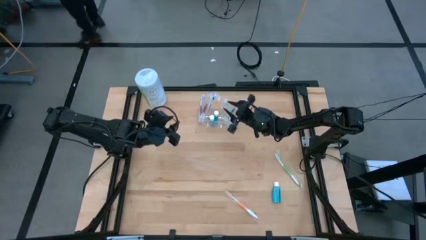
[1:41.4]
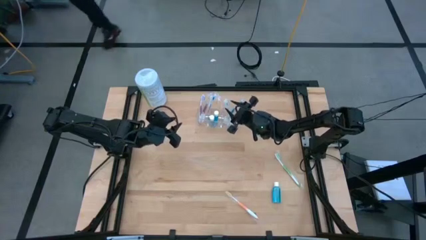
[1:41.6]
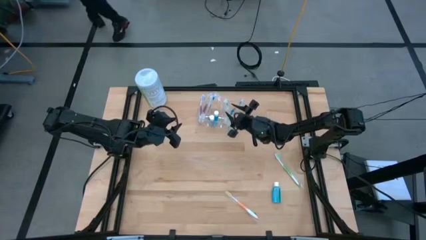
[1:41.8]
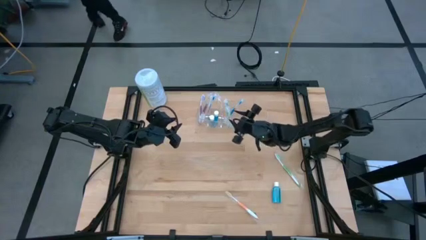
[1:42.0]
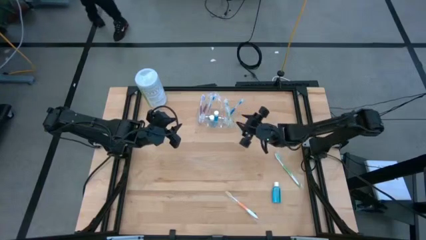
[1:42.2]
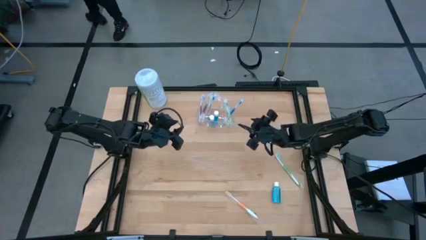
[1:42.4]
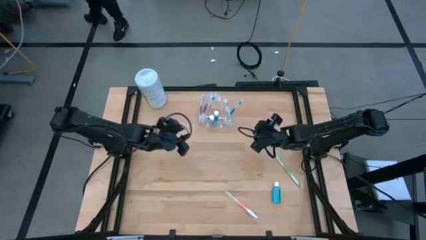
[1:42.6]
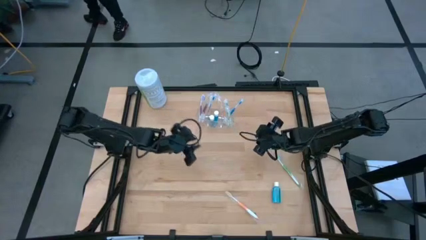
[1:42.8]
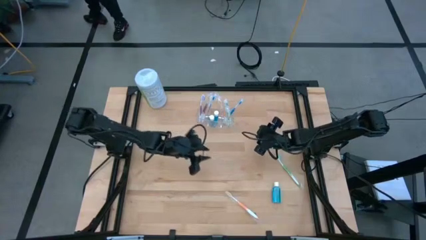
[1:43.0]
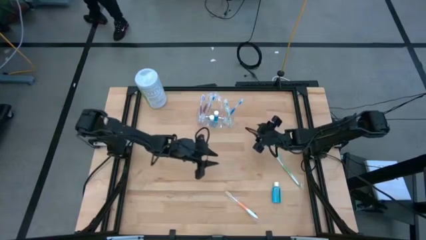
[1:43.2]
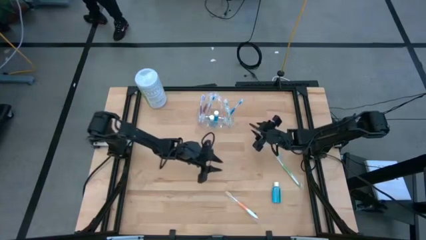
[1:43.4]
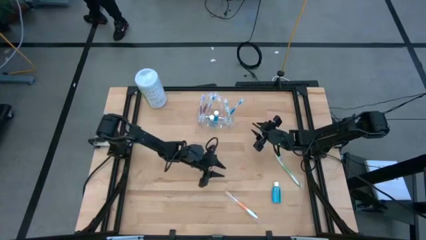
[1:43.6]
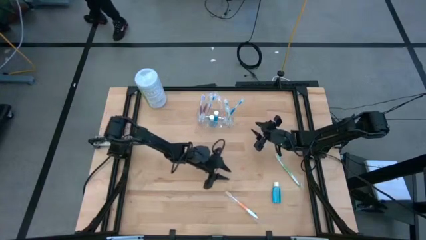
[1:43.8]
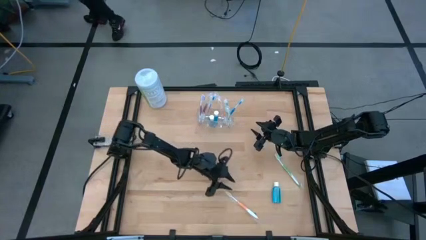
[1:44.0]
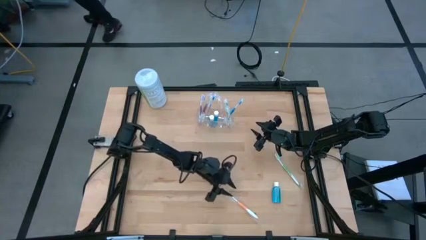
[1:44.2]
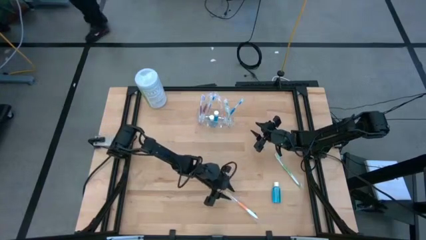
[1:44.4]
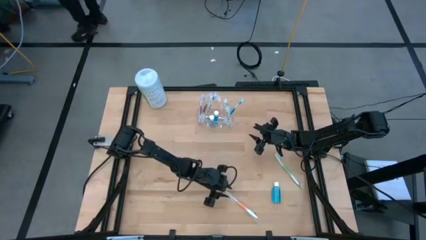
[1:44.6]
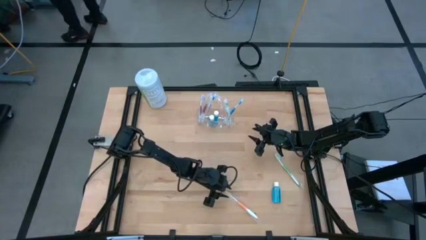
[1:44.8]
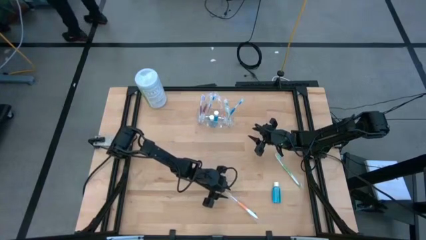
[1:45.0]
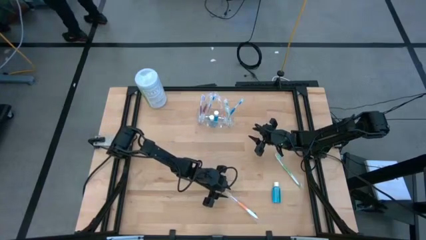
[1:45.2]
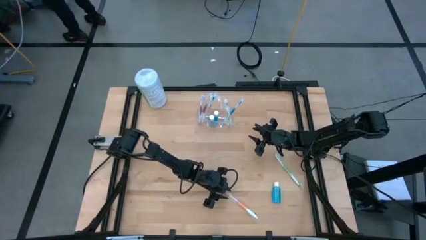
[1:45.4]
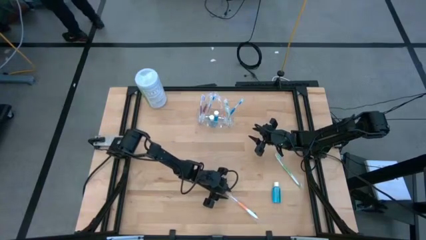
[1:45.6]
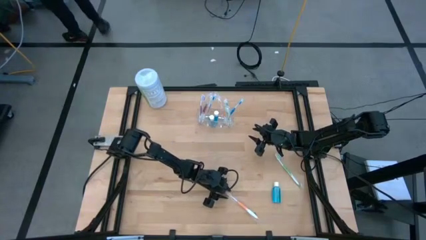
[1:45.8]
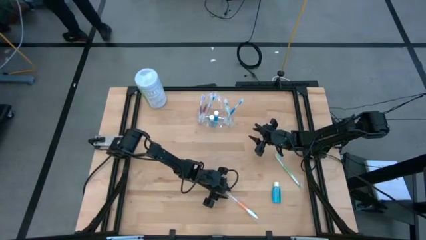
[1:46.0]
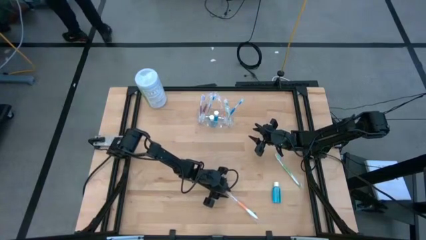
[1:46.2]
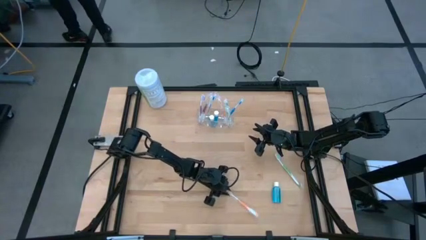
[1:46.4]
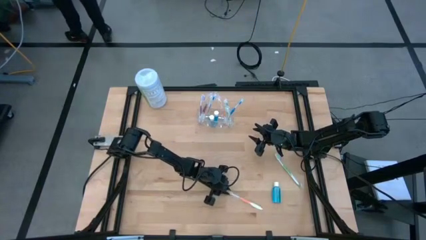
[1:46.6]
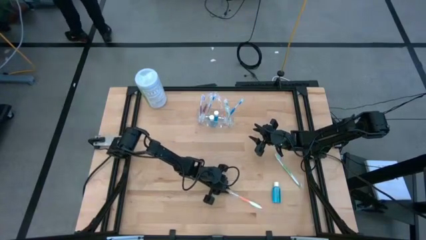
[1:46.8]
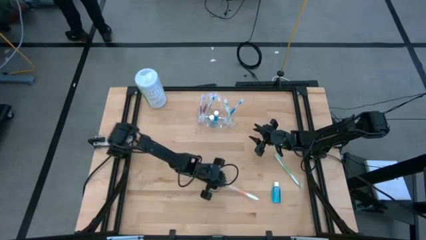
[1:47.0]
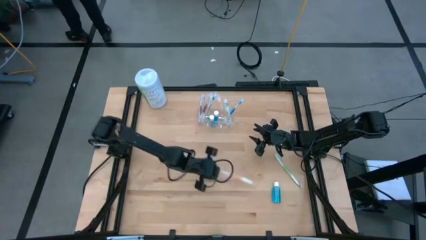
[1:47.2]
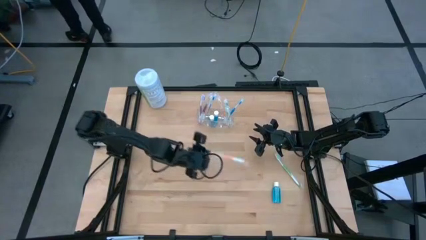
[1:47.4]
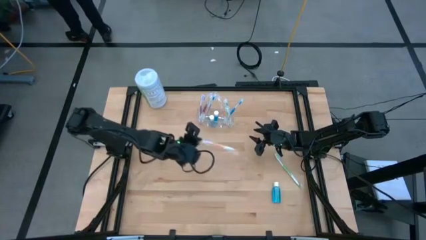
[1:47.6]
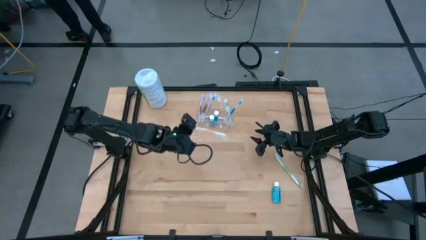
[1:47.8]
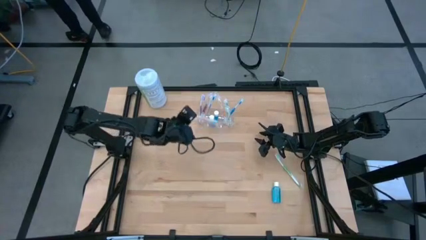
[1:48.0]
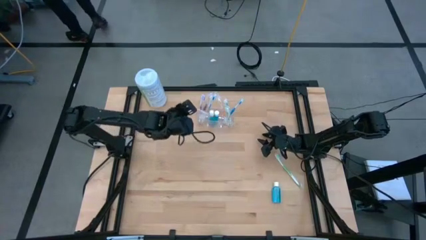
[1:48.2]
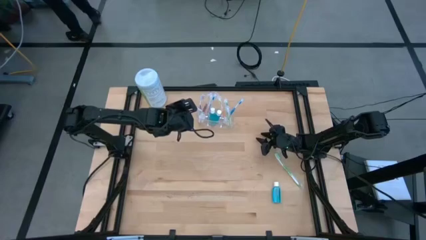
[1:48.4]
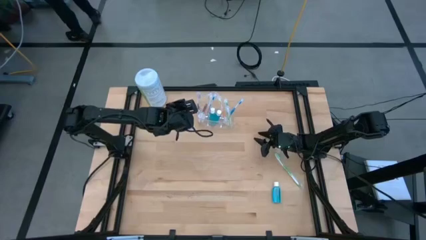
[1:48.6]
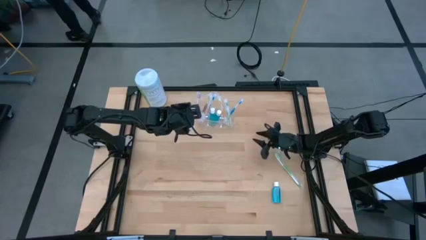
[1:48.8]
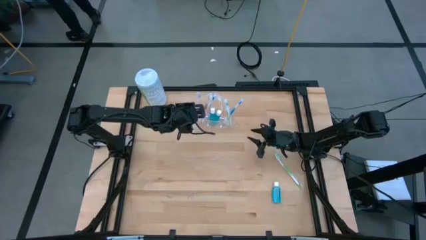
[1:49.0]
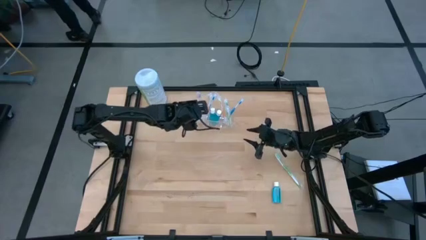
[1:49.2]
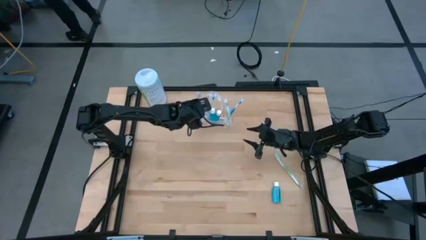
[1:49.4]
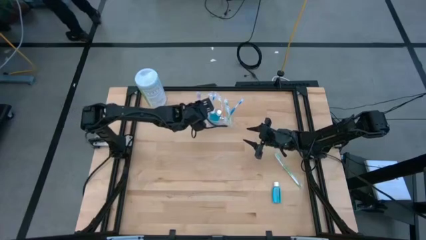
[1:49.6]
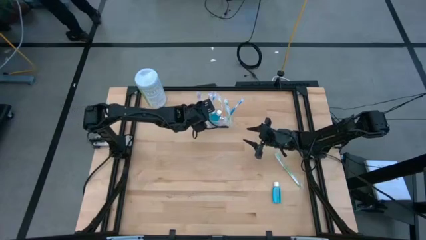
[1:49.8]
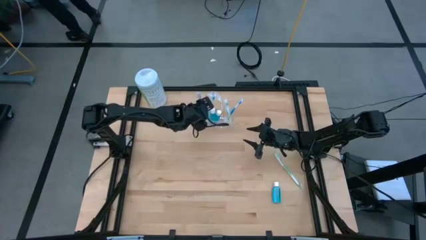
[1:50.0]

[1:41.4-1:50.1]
Task: Pick & Place toothbrushing station
Put the orange toothbrush into the transparent organizer

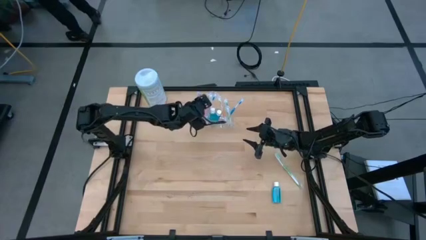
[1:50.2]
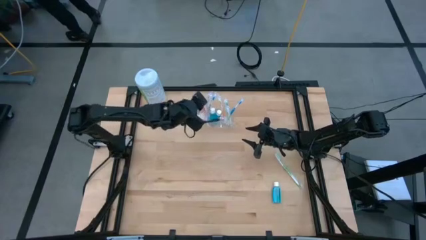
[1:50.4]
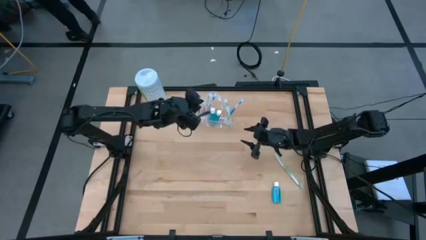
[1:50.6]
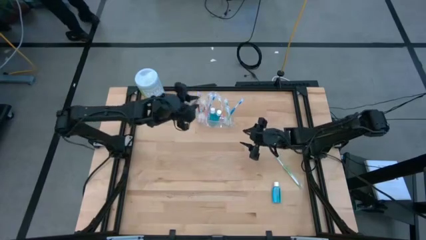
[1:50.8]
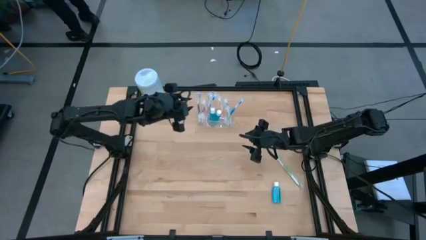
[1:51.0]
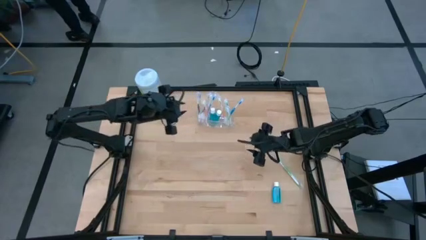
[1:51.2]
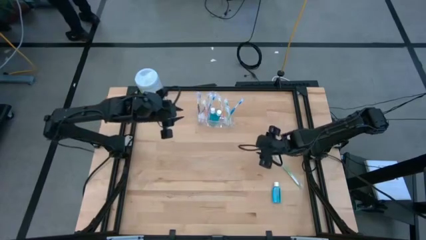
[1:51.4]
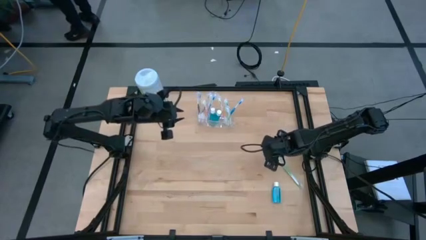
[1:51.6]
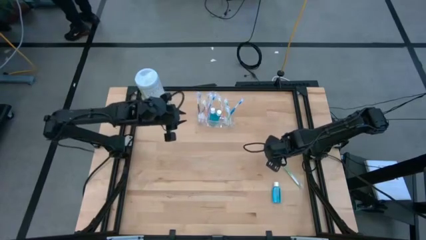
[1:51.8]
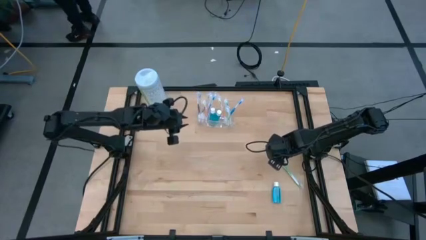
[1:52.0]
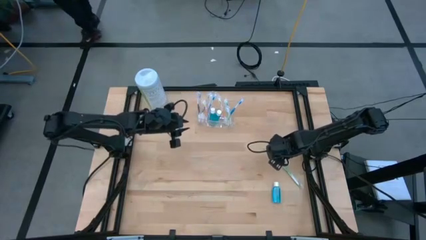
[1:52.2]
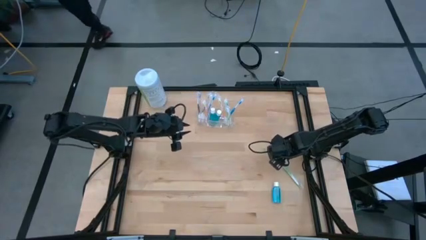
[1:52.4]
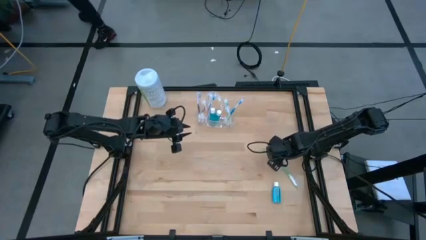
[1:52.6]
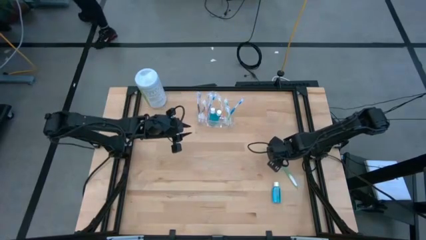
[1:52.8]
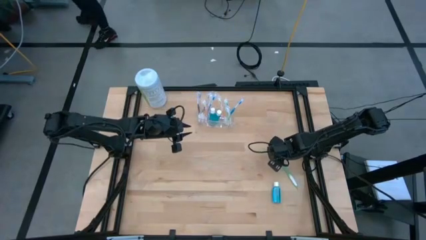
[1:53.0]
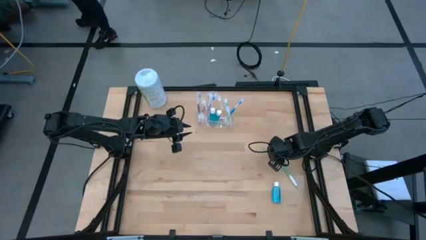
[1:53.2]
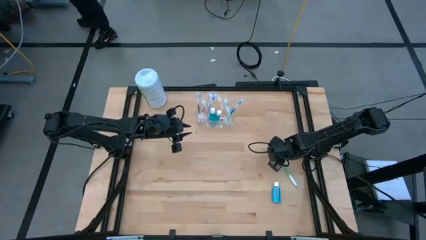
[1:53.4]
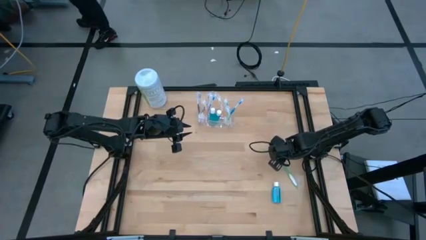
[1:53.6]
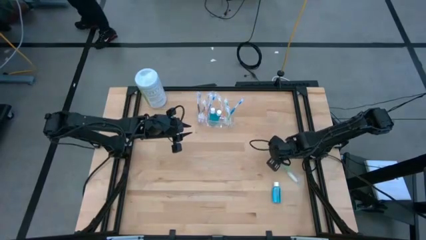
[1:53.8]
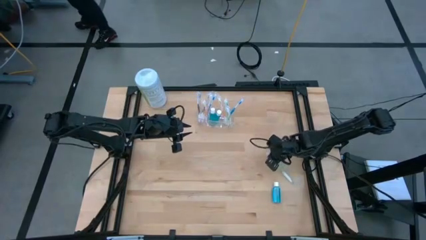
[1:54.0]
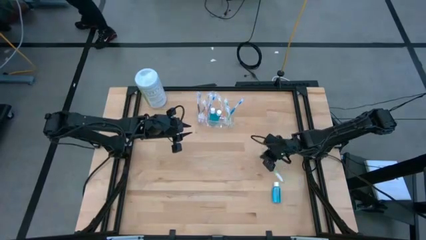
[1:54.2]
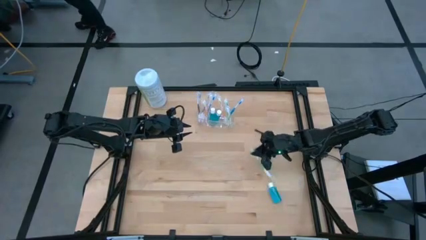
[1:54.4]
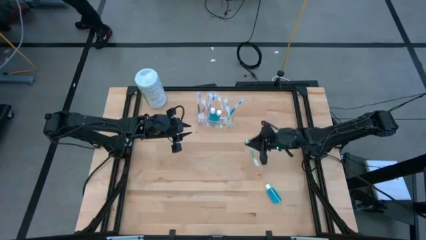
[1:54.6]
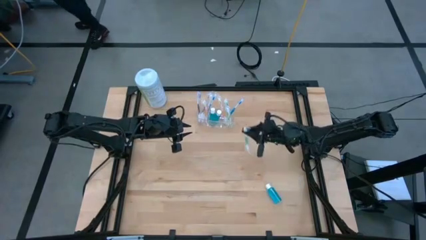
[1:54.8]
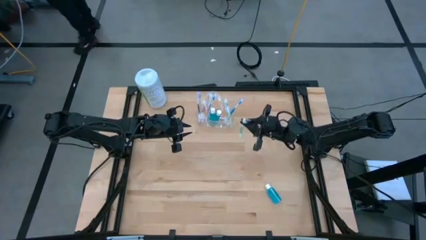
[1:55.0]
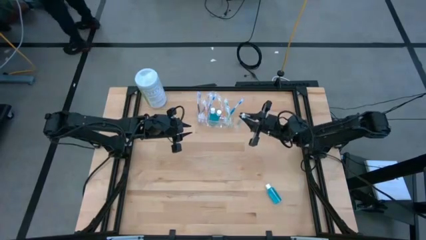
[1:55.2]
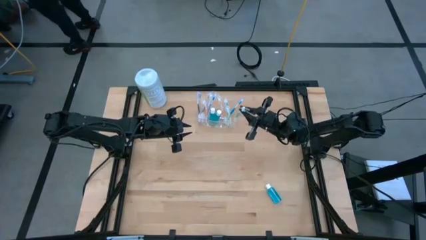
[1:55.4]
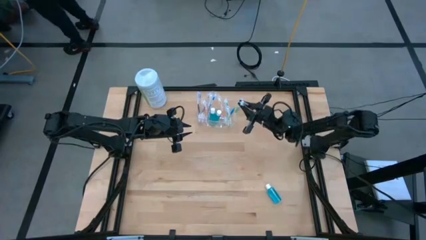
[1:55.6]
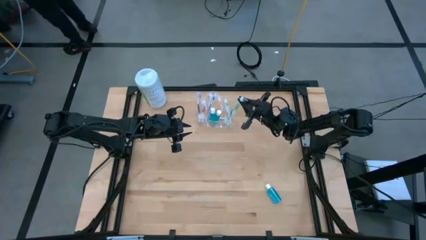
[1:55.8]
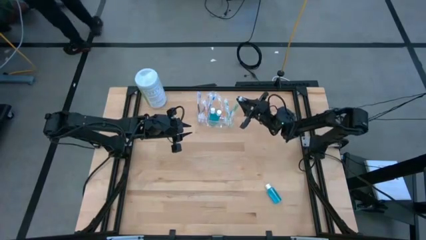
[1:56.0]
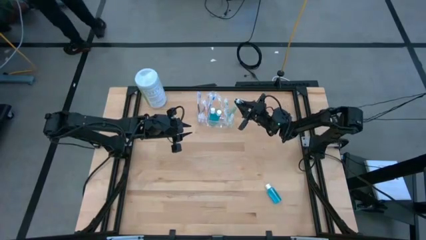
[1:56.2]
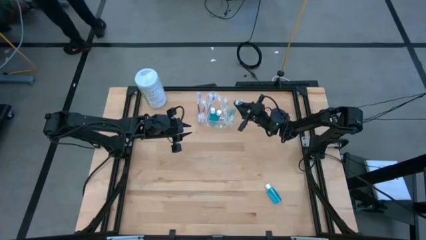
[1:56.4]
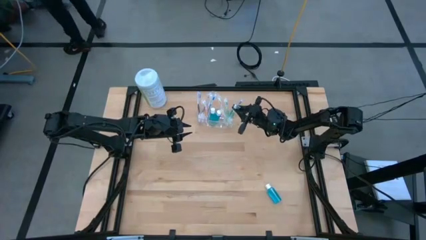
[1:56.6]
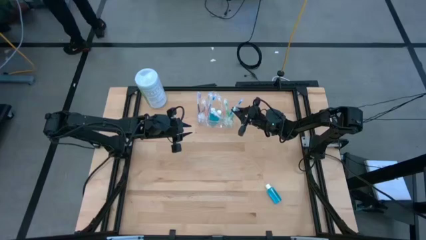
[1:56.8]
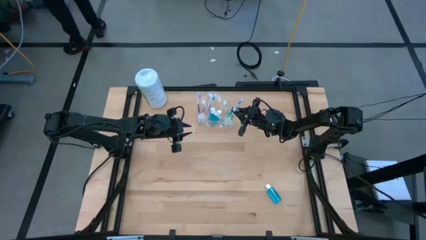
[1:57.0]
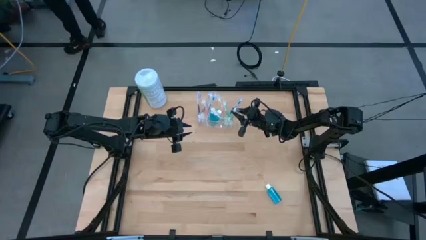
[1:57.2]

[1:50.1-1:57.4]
Put the green toothbrush into the transparent organizer
